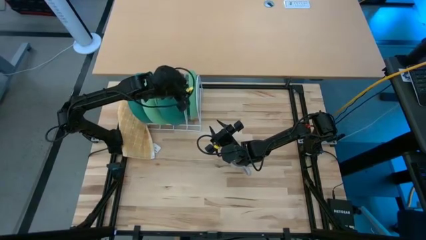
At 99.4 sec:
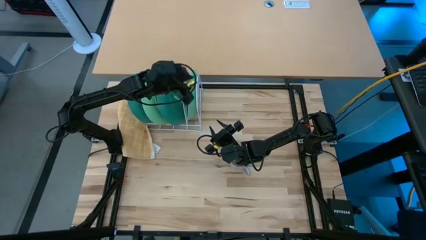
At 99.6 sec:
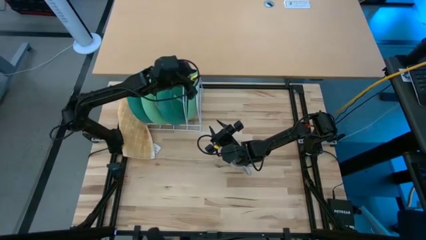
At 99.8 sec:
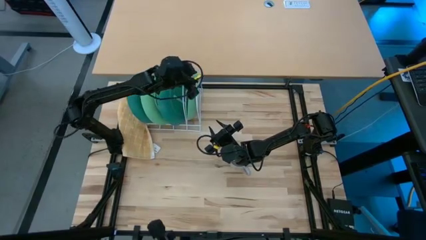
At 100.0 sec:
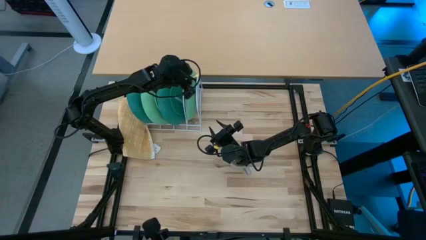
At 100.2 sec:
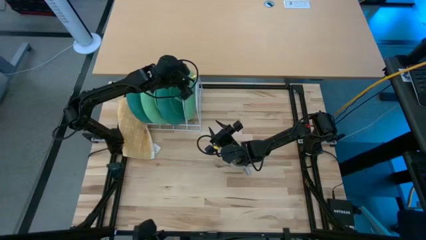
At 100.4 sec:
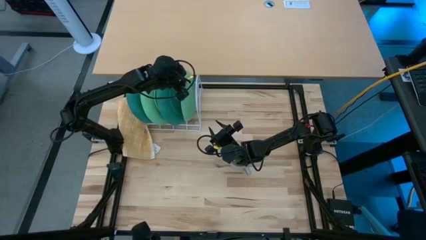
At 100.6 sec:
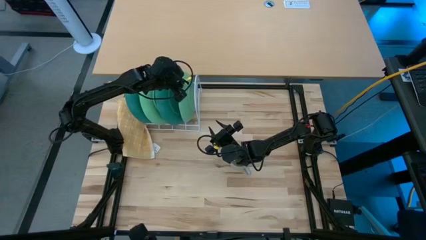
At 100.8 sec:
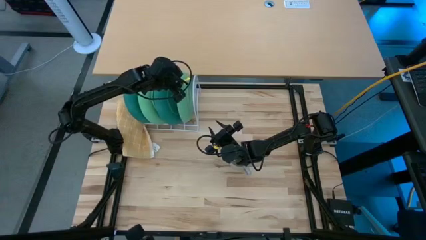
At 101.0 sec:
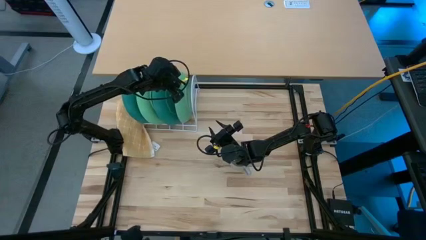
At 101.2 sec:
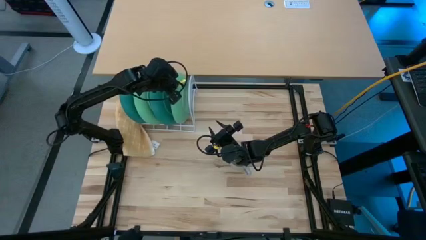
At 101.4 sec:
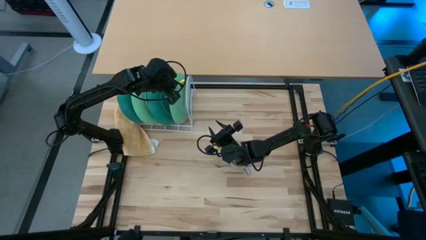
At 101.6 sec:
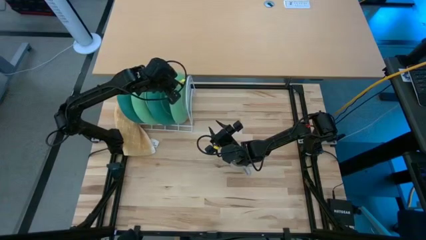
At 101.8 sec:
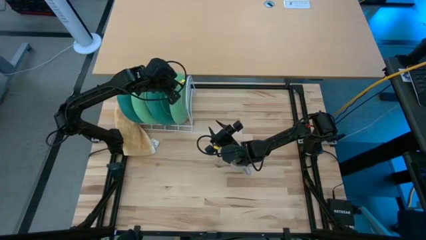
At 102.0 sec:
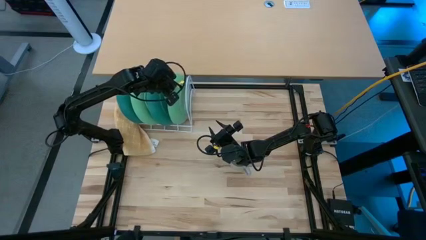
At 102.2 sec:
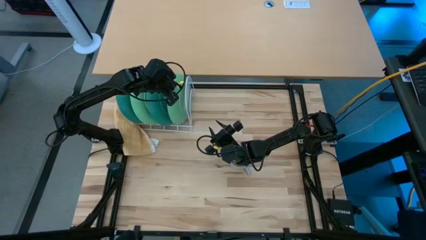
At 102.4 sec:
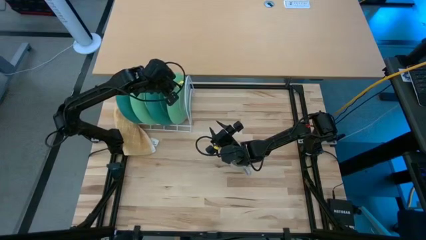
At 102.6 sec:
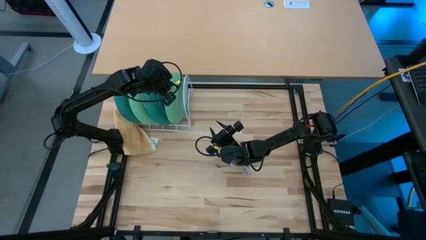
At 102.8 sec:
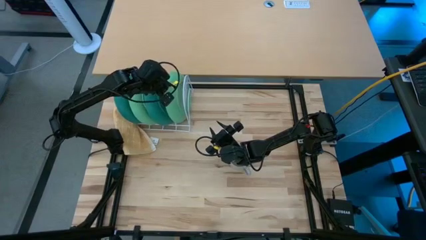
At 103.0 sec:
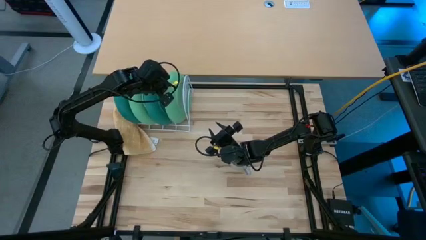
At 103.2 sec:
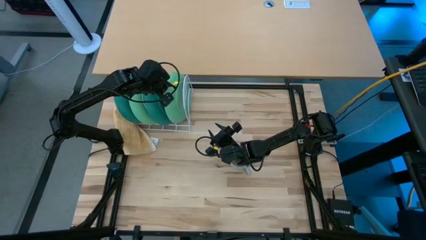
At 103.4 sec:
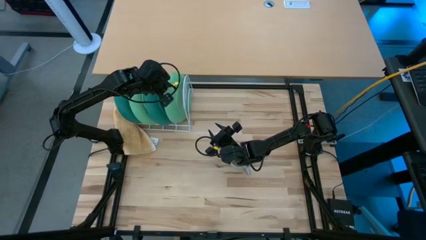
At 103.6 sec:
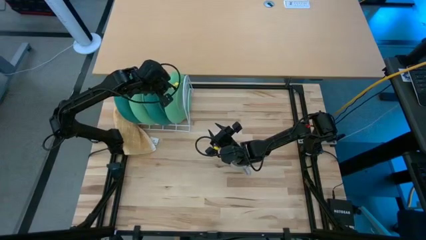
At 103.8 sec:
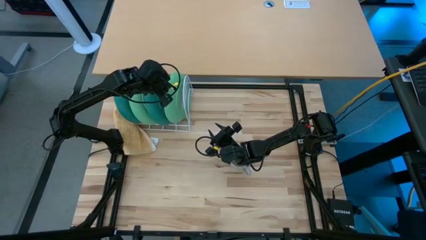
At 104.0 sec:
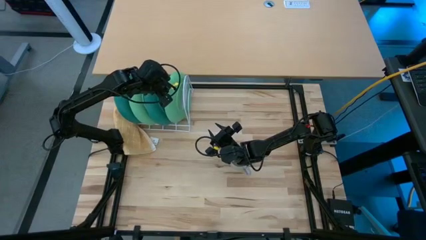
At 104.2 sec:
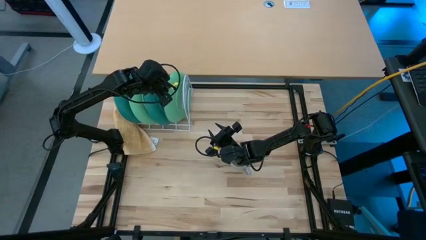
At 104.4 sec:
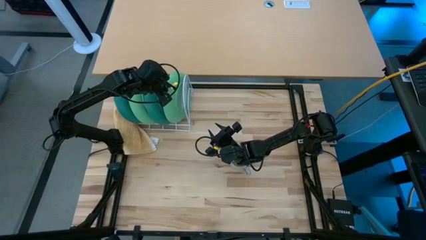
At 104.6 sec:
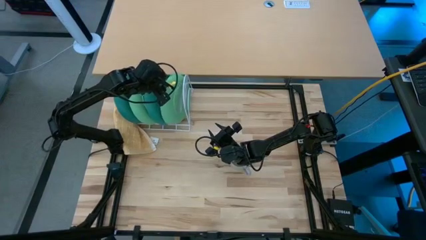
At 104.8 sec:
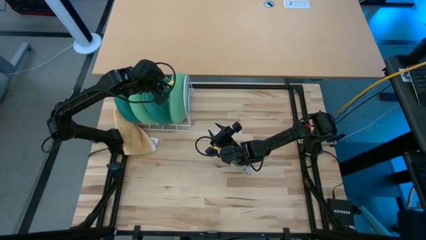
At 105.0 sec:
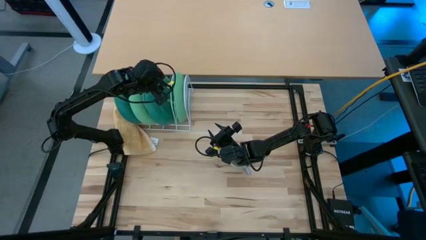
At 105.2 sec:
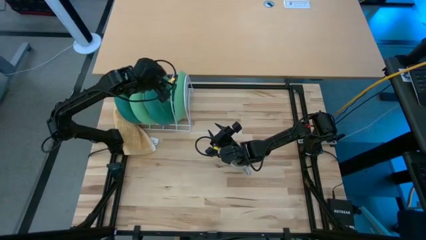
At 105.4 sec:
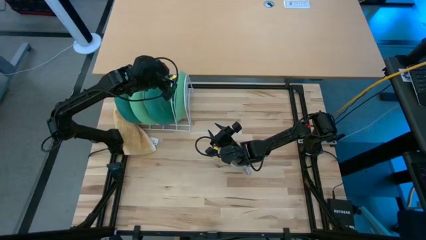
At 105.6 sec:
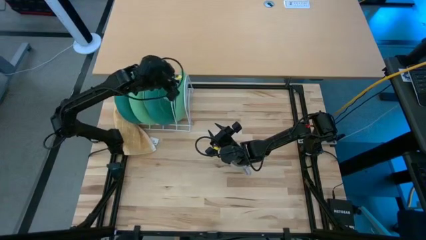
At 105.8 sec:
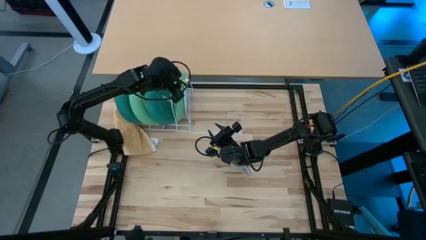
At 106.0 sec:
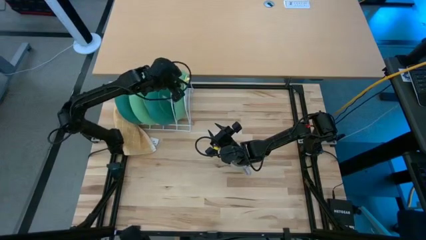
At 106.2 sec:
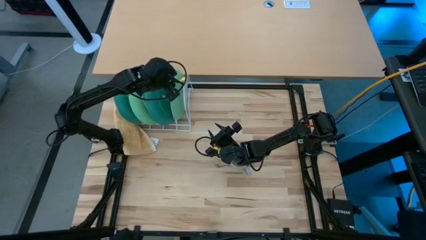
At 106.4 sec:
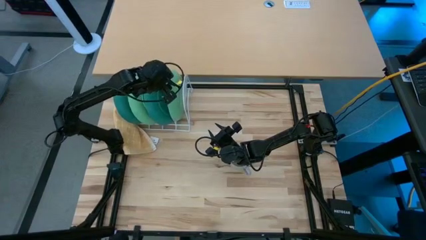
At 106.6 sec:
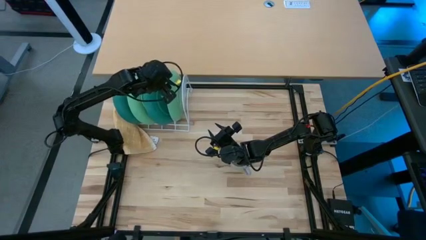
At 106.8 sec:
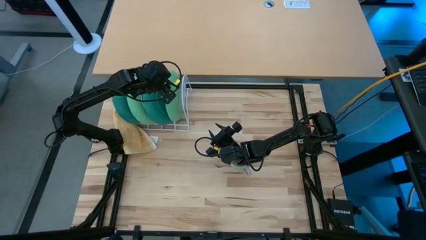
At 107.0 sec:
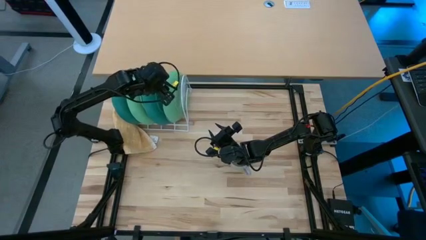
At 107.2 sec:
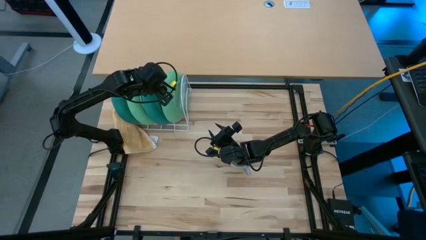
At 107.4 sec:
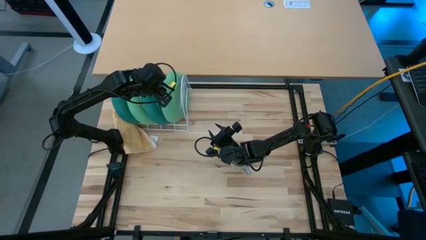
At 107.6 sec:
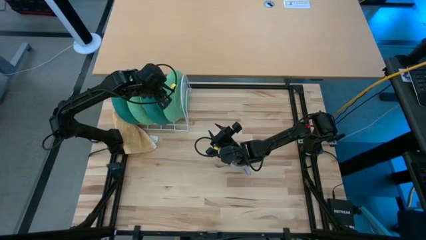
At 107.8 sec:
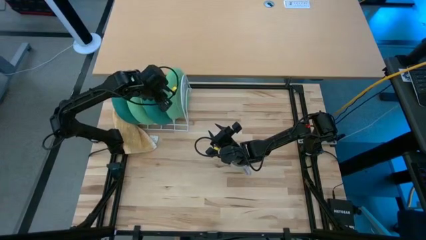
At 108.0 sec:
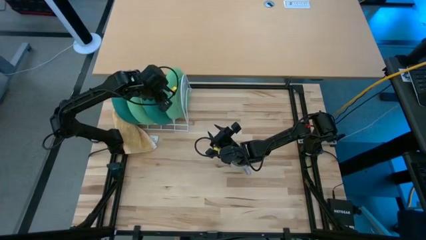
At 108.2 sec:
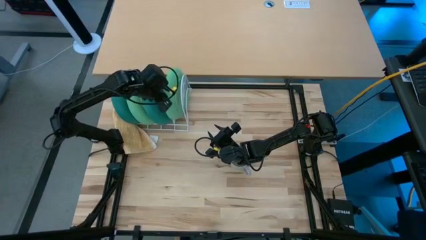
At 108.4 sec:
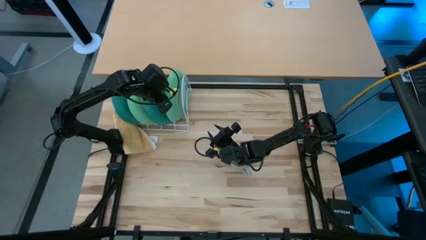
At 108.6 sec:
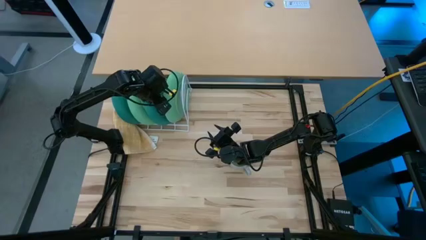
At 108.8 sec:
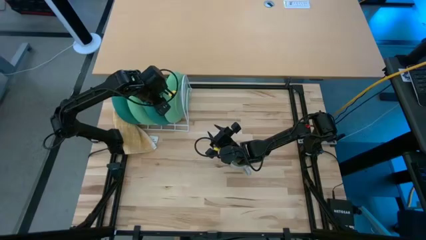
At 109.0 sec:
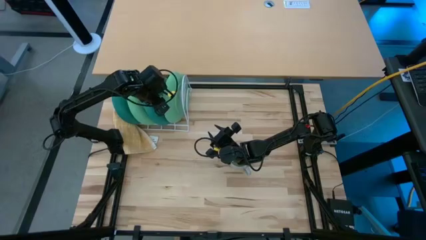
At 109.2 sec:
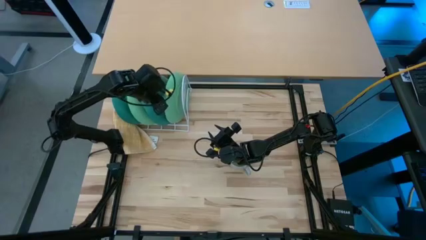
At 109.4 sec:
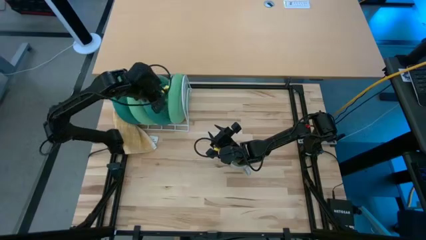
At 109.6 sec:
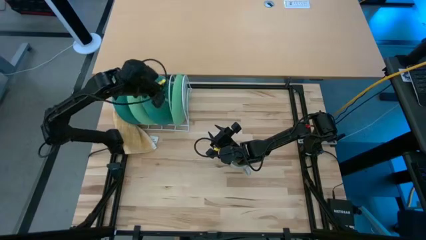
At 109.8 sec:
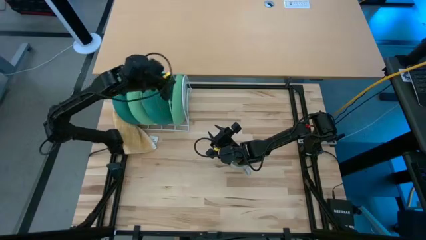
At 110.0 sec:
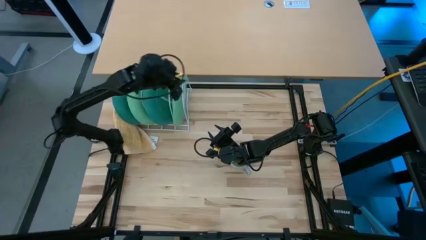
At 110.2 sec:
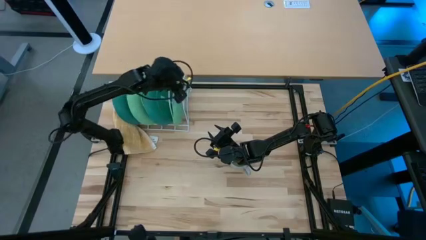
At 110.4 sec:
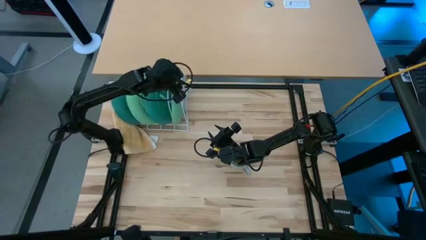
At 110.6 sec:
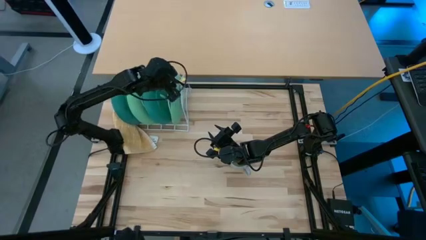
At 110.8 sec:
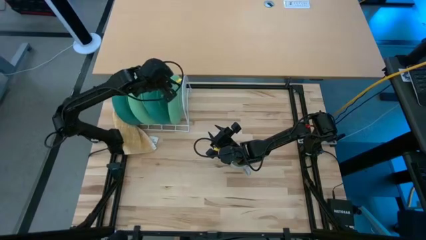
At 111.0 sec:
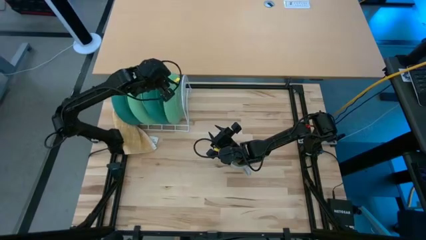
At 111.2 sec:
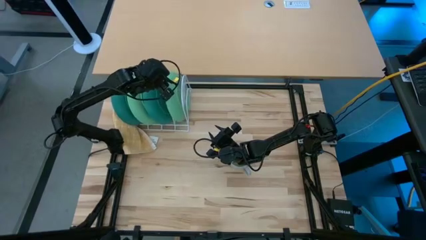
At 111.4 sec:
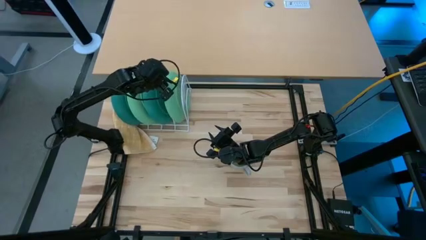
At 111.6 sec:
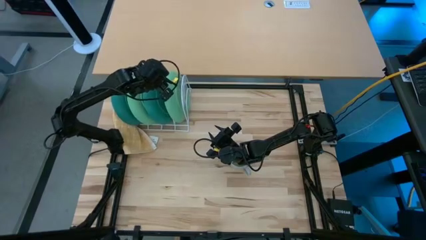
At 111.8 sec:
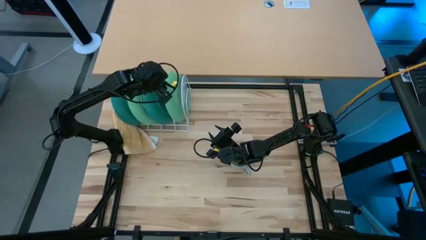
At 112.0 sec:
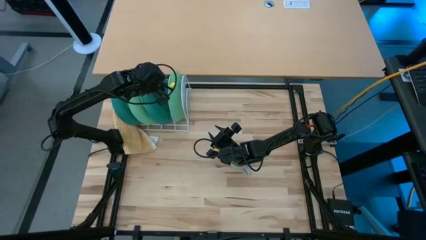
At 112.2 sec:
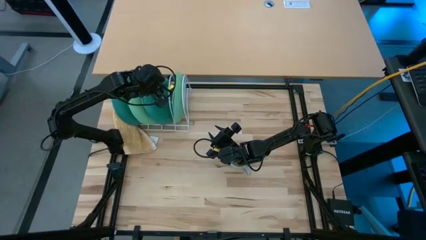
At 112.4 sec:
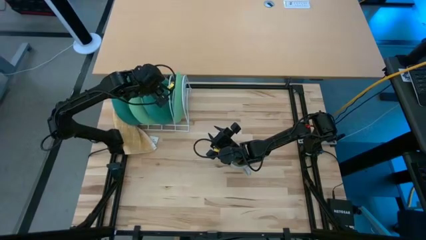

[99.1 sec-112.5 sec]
Task: Sort dishes
Put the green plate into the dish rack

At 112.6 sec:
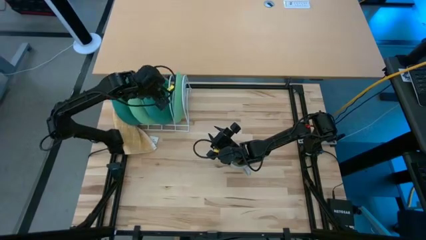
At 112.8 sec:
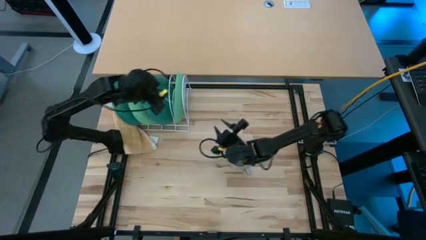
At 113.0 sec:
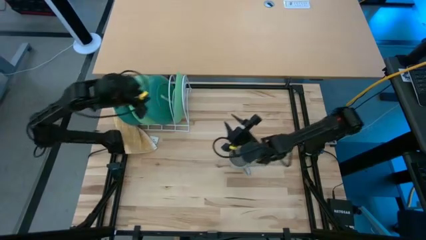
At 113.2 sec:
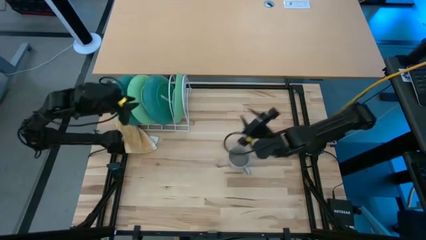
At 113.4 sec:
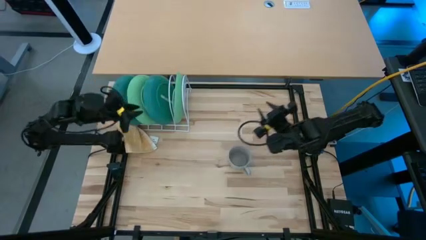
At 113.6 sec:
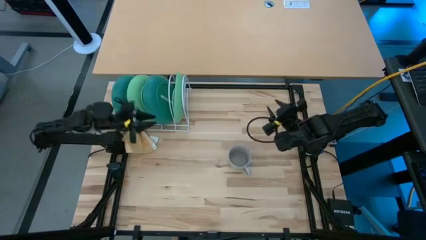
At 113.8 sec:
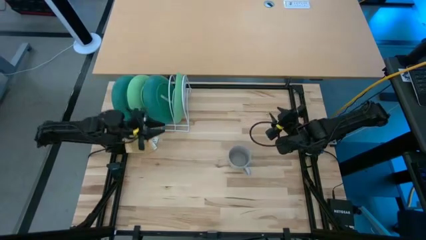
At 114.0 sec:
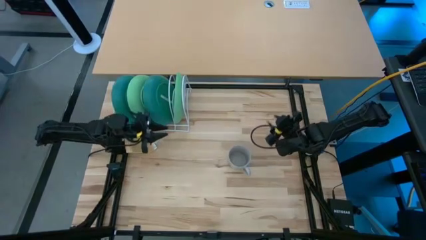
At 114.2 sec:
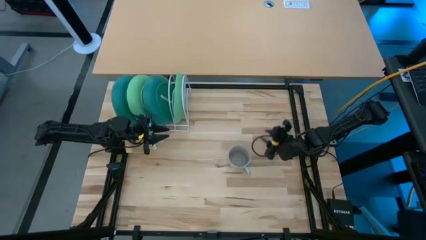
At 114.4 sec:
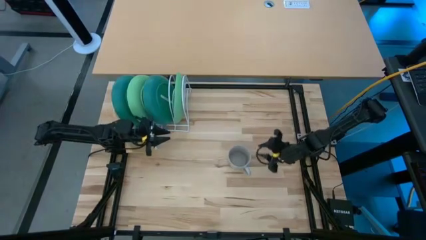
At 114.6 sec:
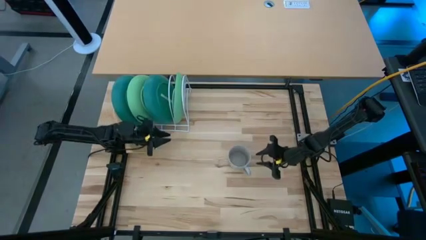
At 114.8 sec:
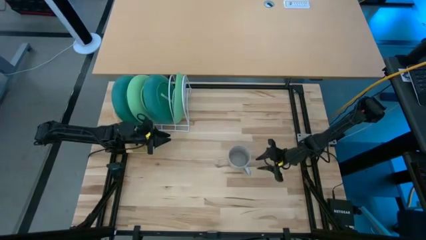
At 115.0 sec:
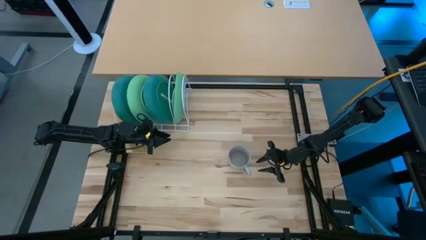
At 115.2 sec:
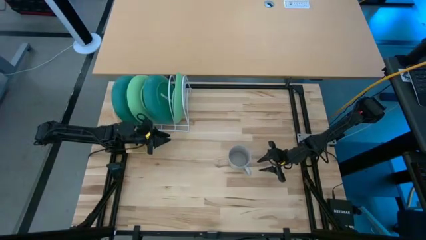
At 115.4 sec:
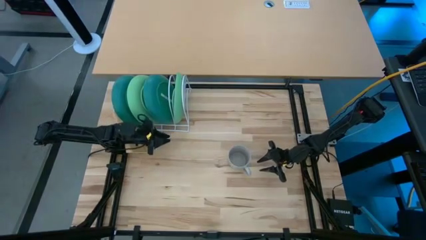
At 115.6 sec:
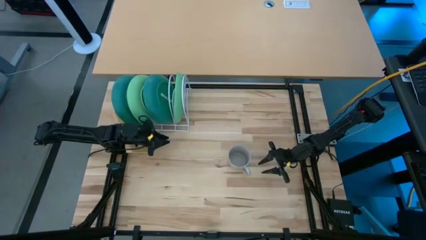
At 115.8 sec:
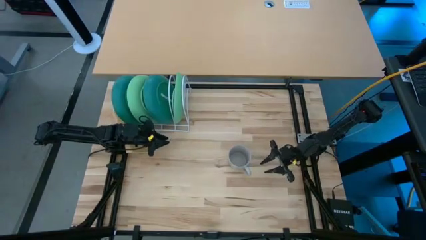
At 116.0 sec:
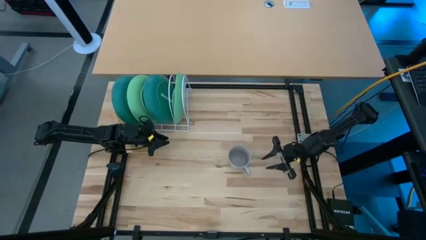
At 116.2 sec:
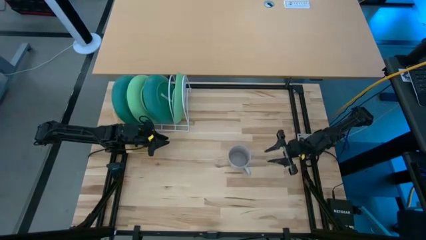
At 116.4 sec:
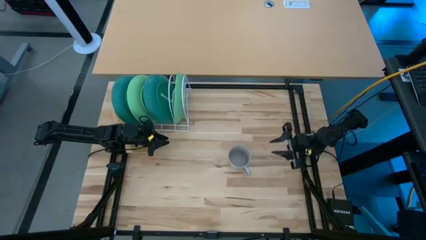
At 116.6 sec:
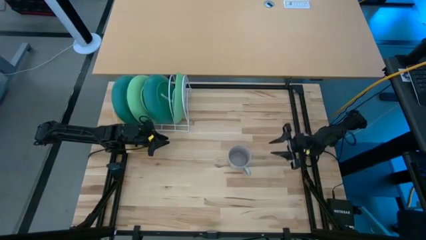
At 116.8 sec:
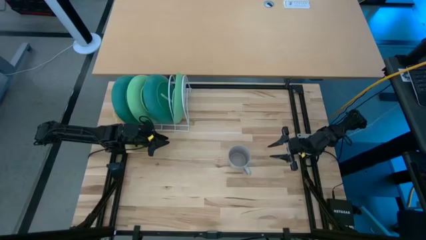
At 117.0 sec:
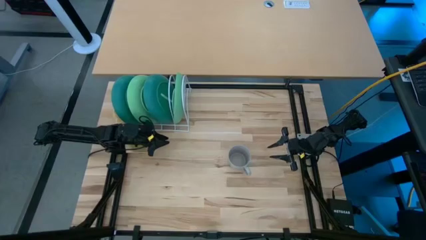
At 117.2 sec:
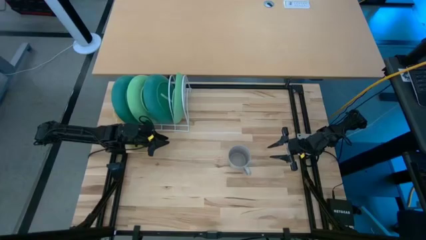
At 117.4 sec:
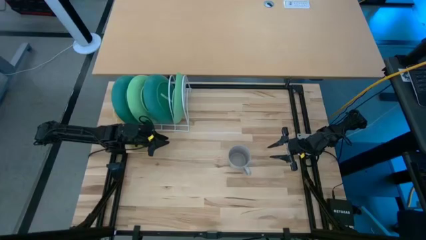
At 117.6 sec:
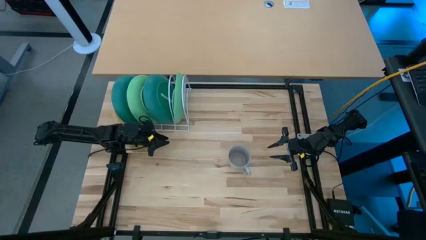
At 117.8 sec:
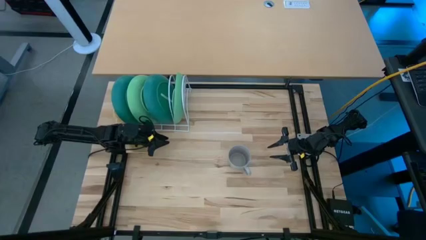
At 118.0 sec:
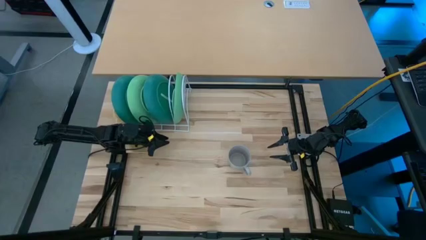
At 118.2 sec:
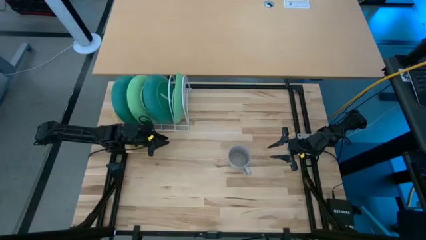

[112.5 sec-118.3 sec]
Return to Home Position
